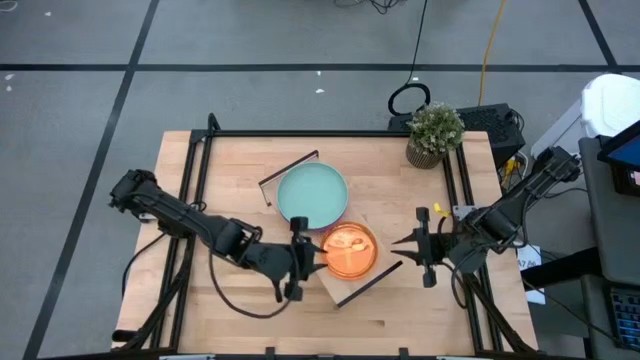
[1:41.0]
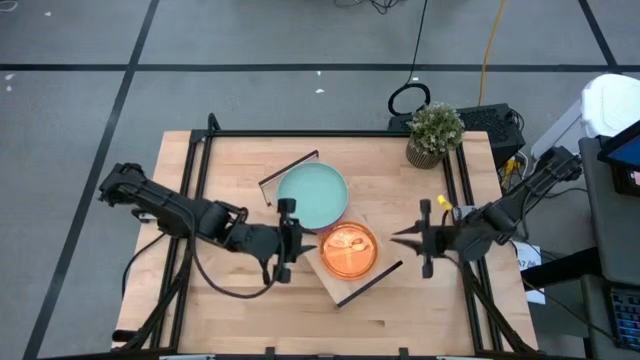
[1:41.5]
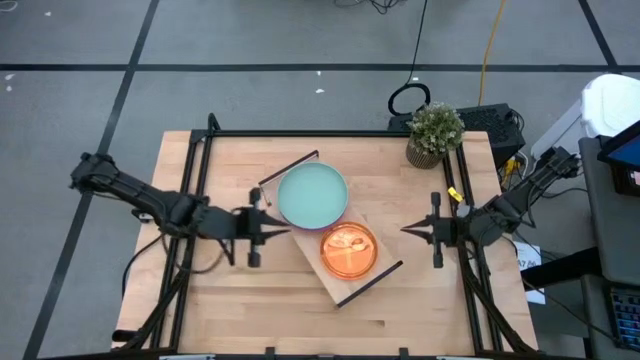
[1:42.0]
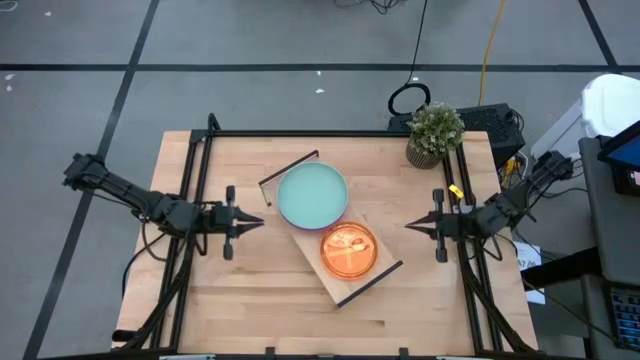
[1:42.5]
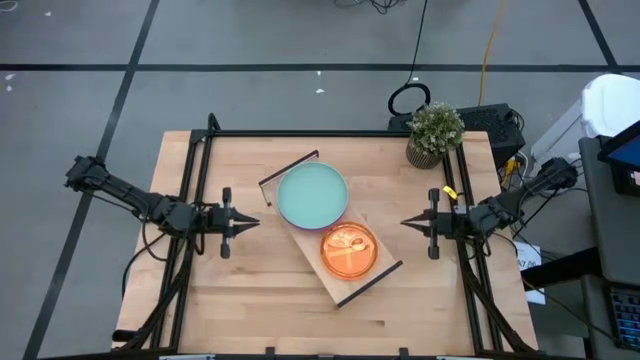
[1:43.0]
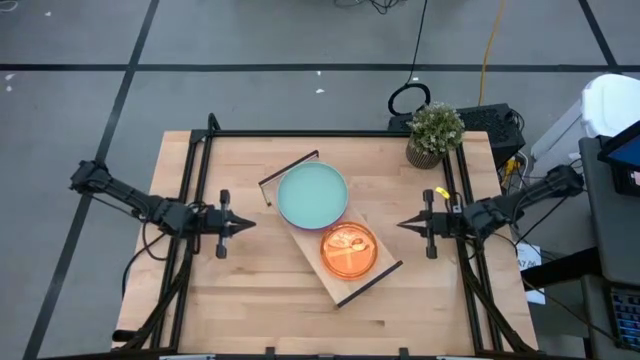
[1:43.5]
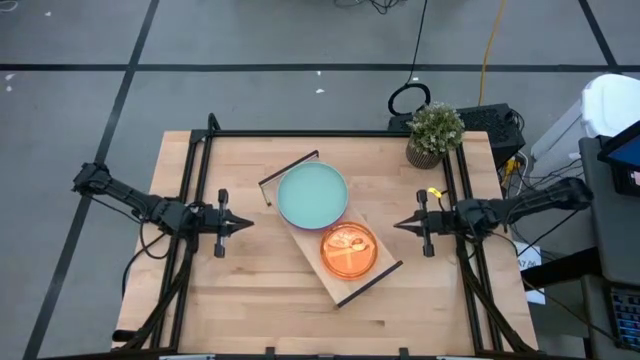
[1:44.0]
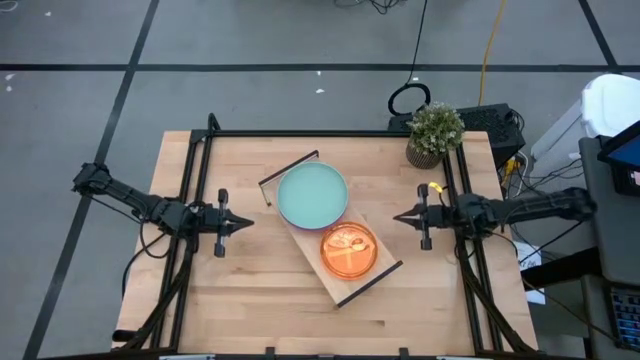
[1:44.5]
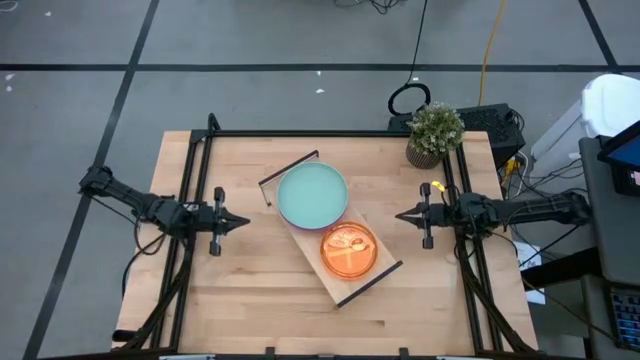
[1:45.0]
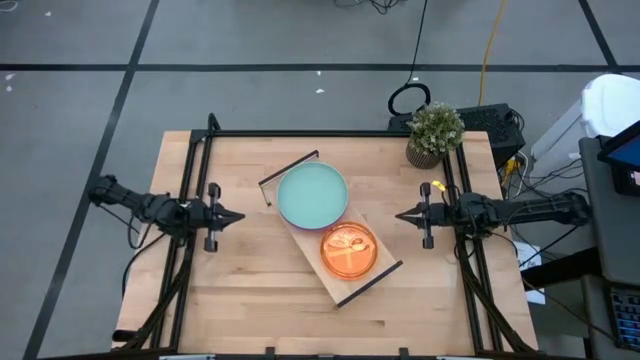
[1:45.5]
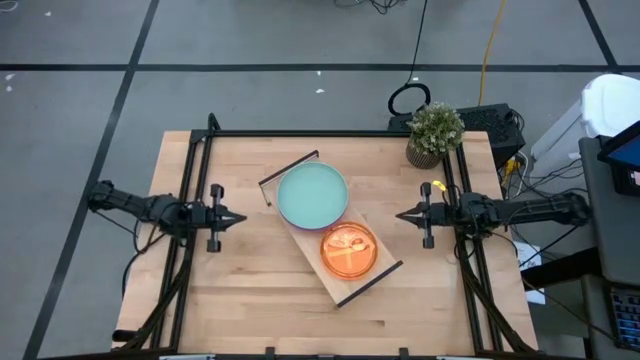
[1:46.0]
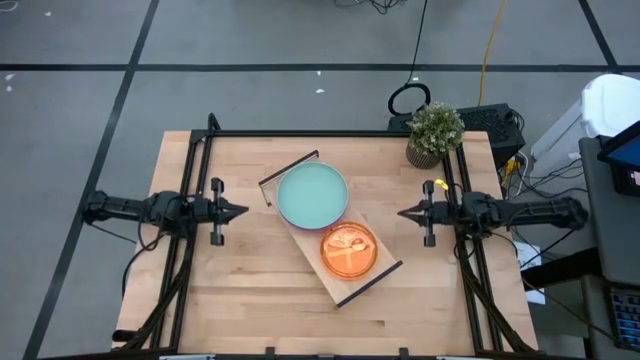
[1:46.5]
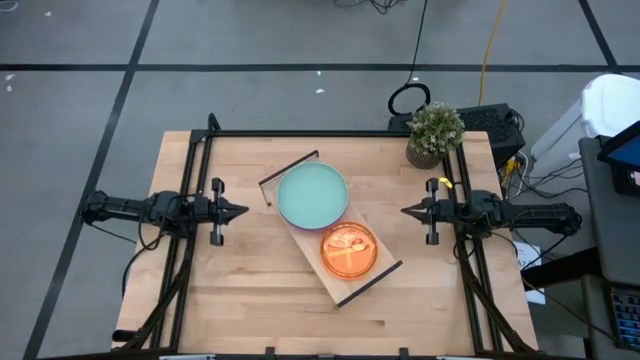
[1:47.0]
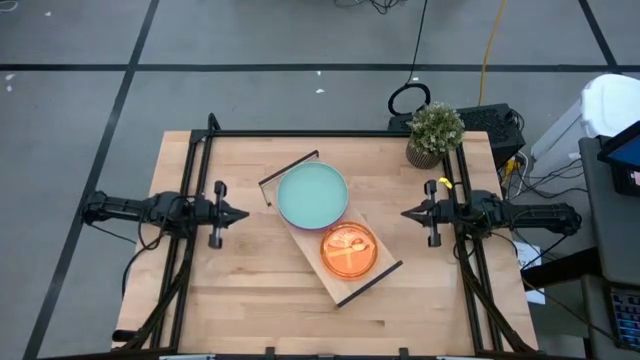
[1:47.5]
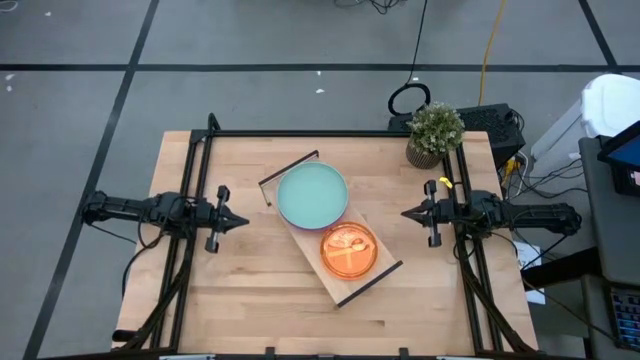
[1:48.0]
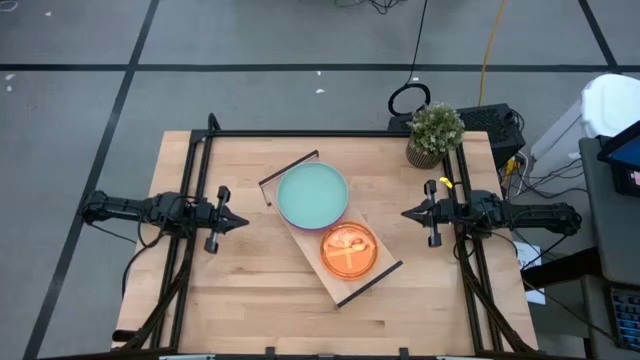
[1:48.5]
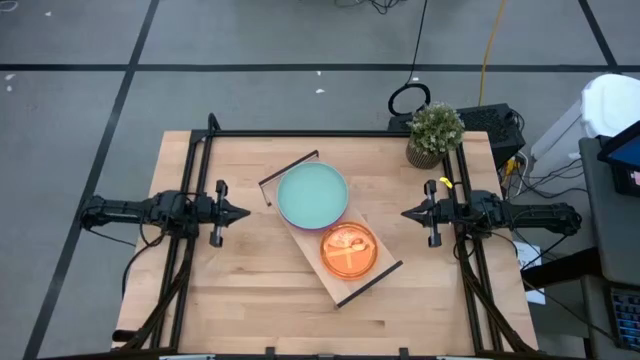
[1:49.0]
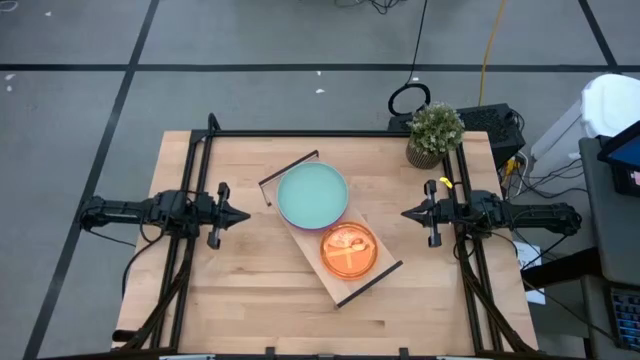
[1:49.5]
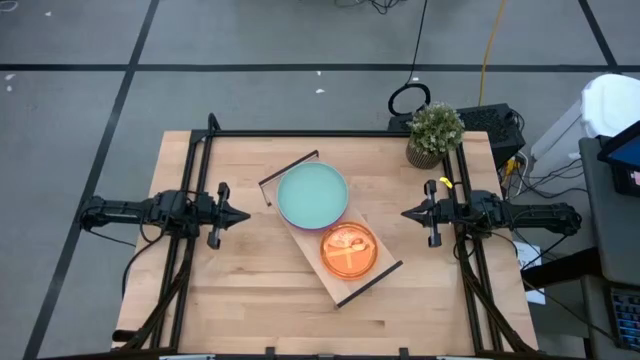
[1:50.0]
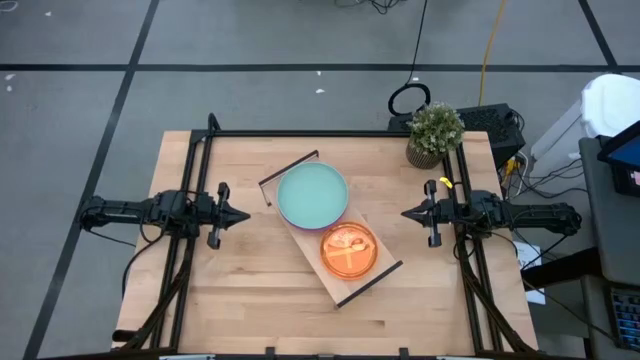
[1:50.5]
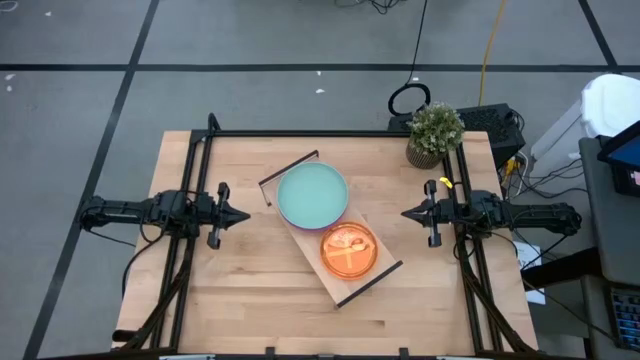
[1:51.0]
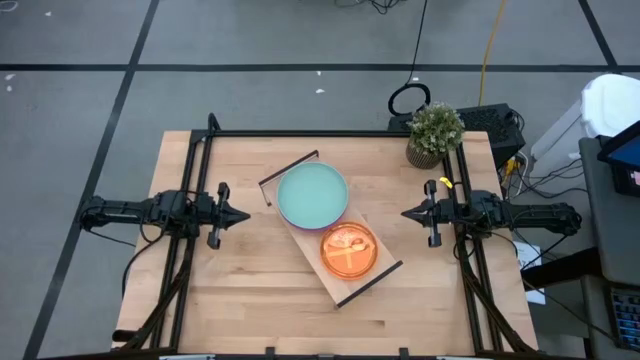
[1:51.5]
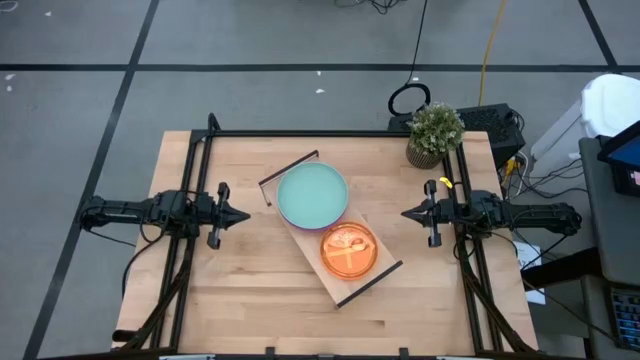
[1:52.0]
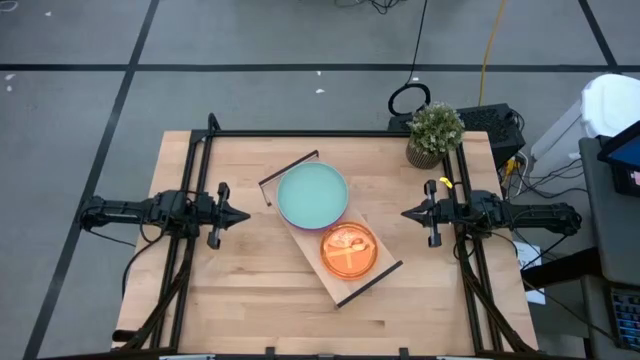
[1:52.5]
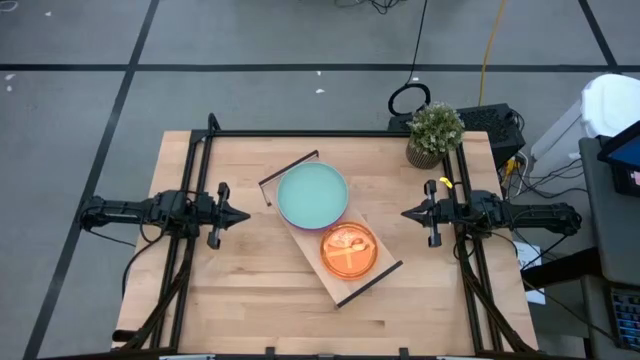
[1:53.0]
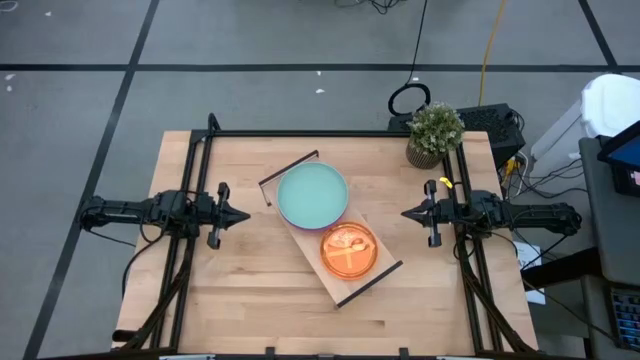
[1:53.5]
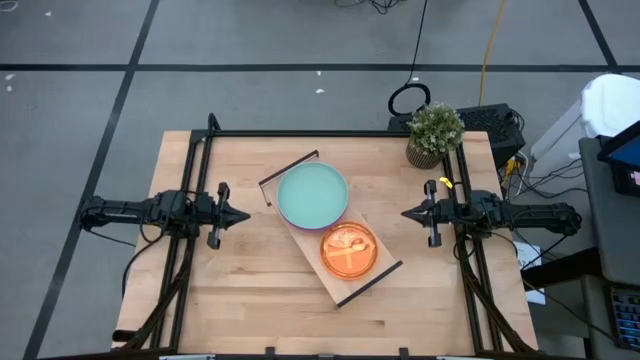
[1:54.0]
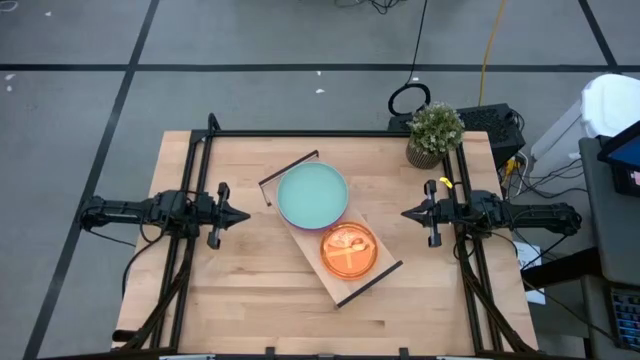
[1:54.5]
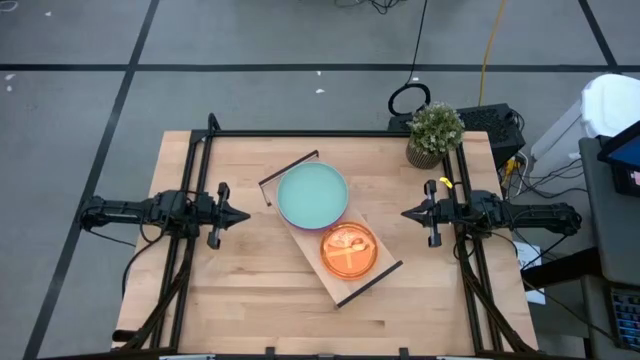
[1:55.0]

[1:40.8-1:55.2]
Task: Place and stack plates onto a shelf
Return to Home Position

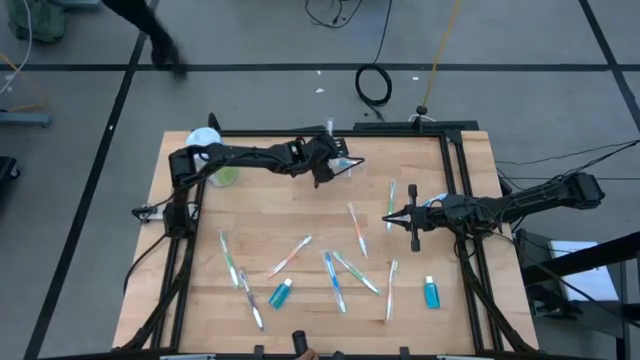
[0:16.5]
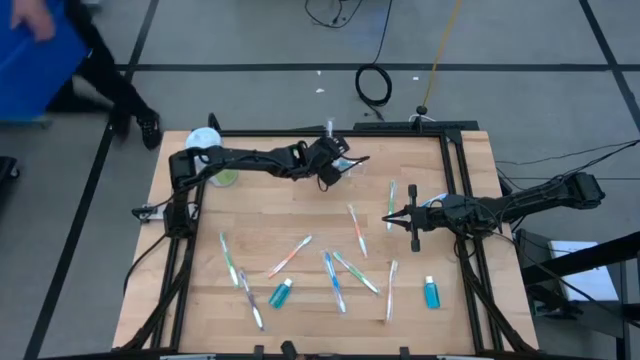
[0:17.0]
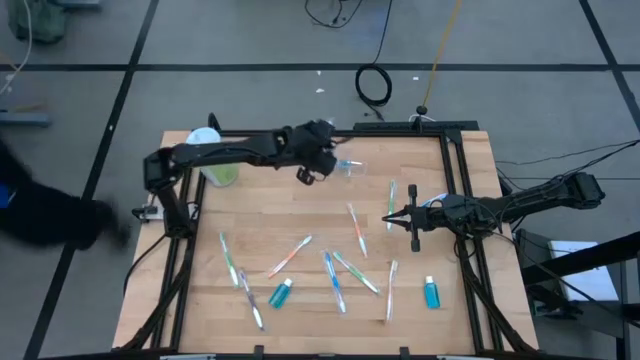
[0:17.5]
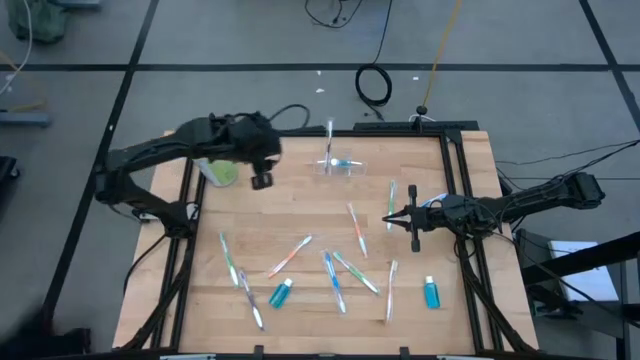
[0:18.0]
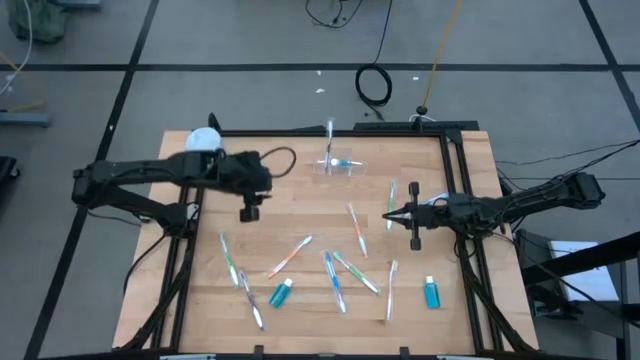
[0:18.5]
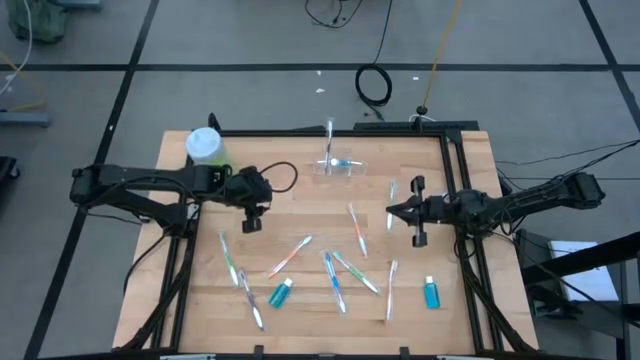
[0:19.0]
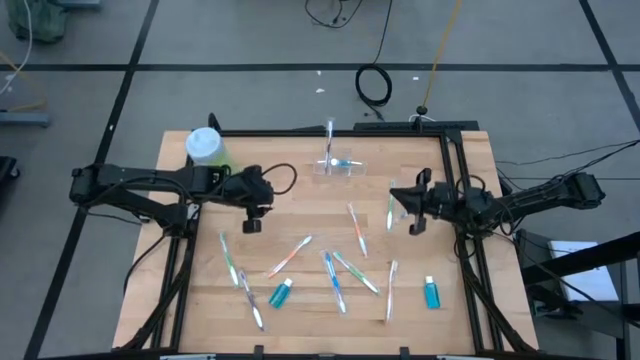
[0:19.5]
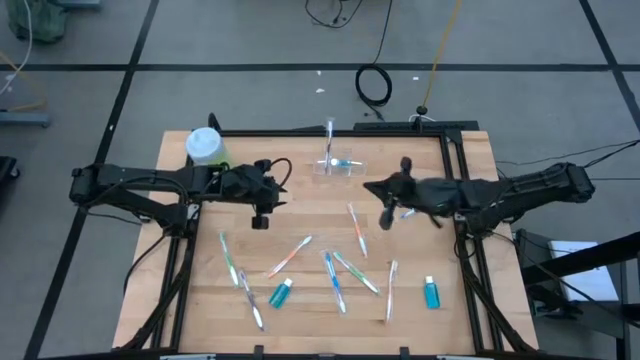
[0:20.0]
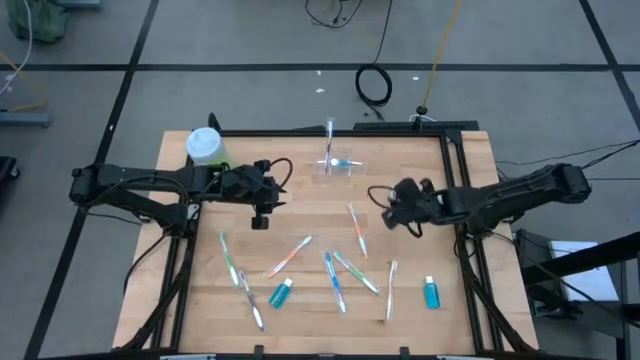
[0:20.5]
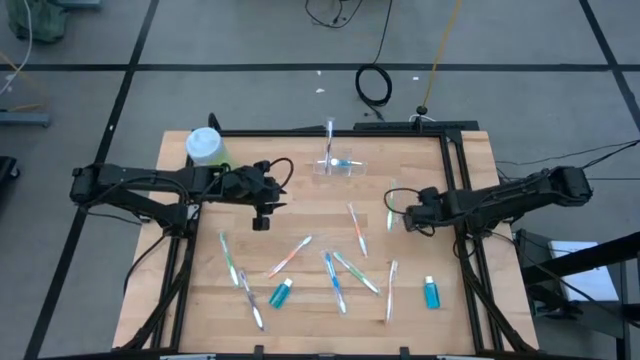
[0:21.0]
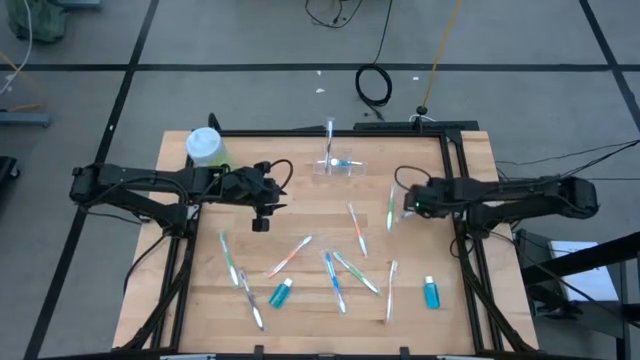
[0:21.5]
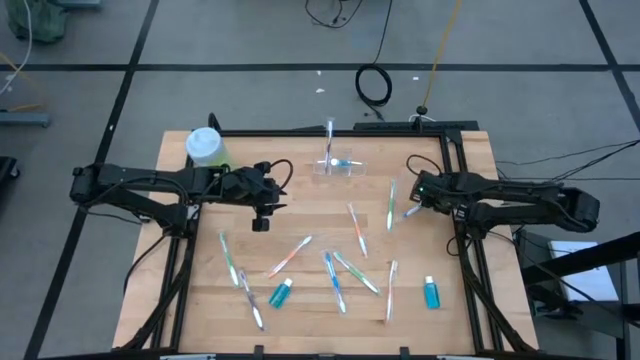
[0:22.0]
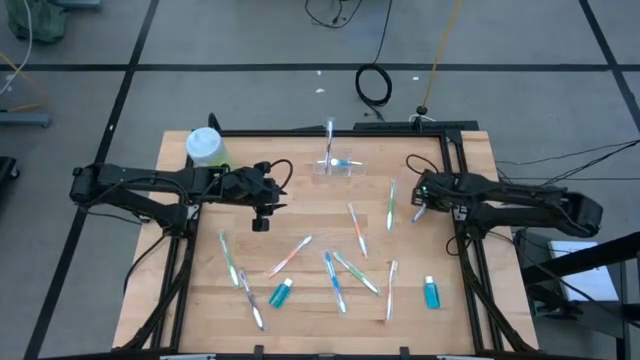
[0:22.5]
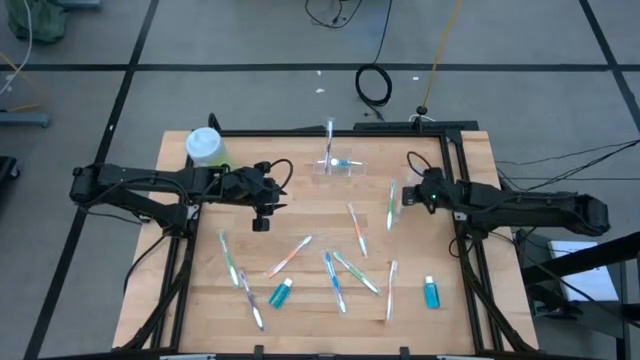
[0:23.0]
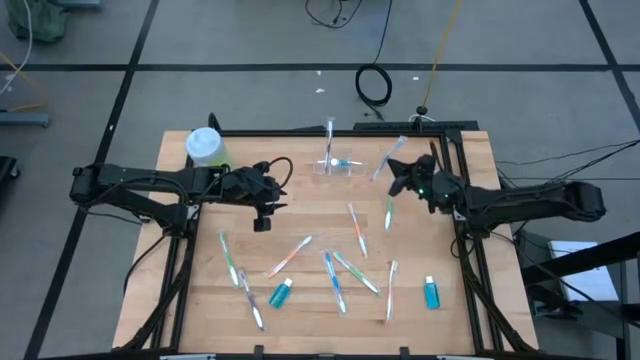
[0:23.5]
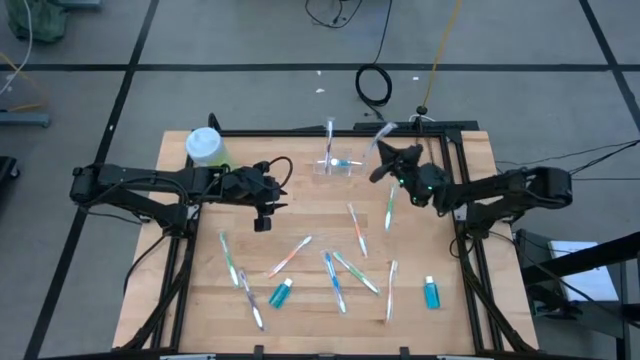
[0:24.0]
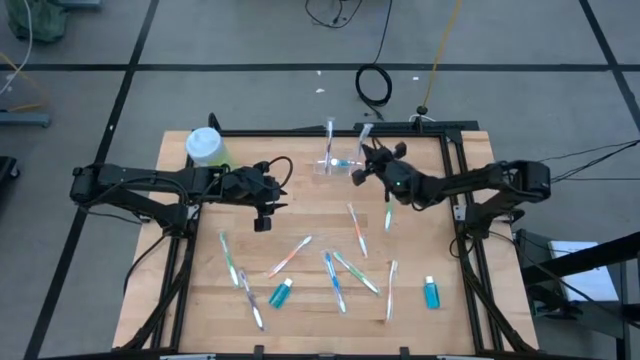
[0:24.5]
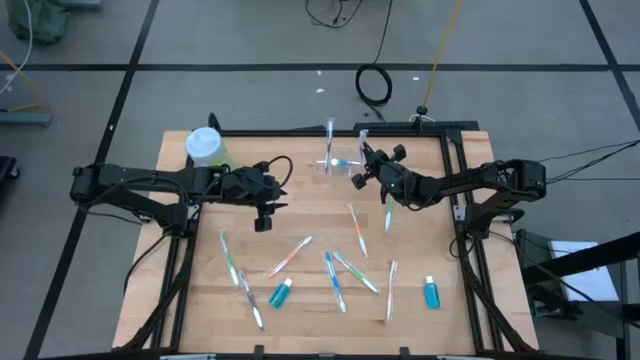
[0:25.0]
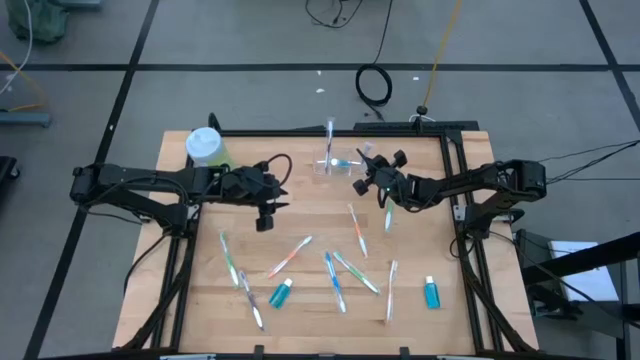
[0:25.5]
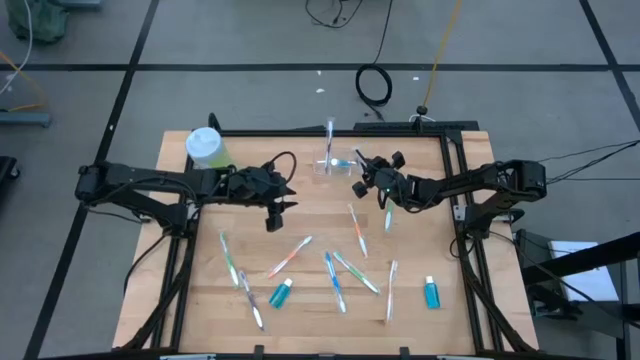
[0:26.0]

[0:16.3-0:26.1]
Task: Pick & Place toothbrushing station
Put the top blue toothbrush into the transparent organizer
